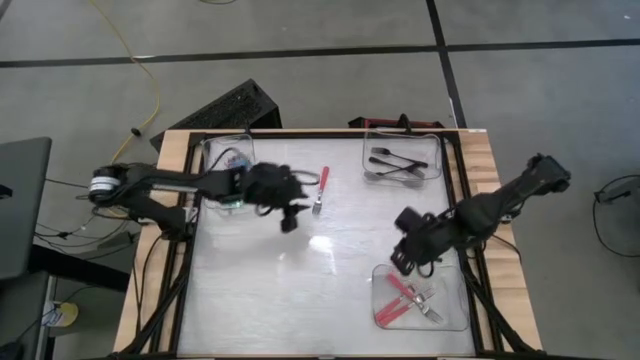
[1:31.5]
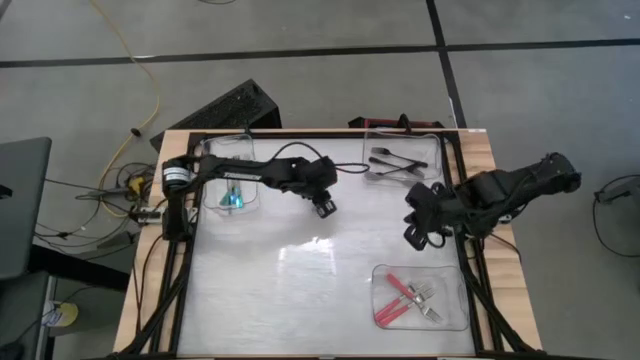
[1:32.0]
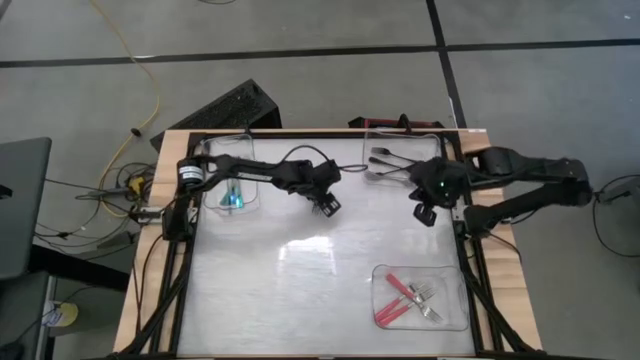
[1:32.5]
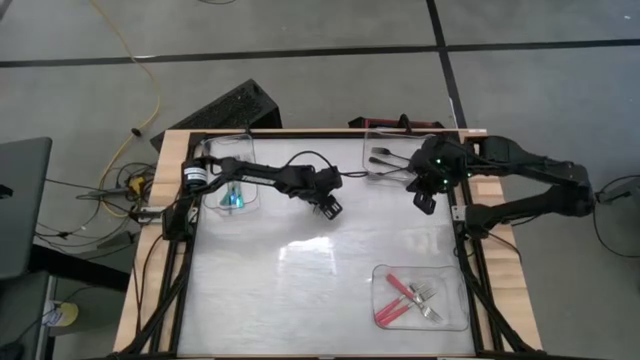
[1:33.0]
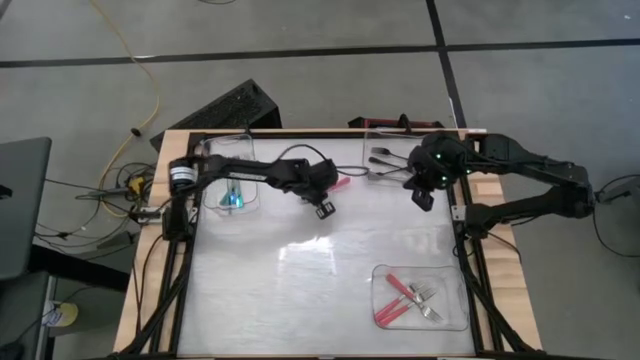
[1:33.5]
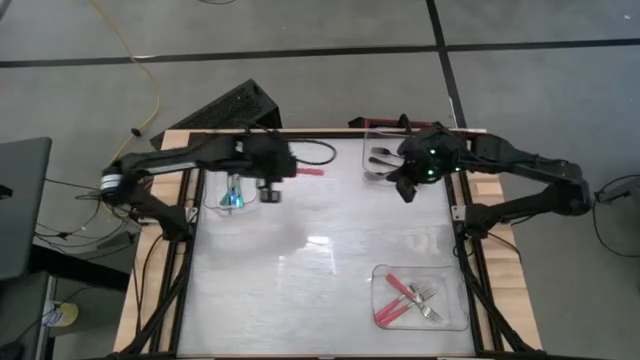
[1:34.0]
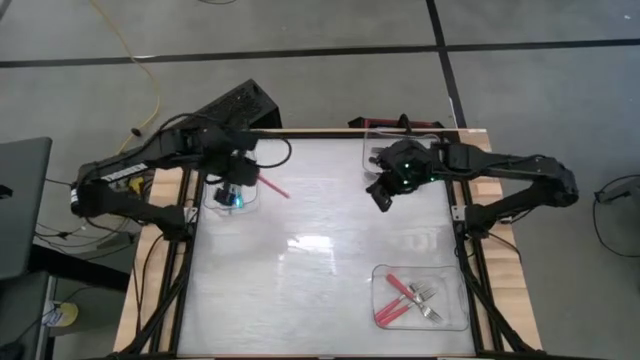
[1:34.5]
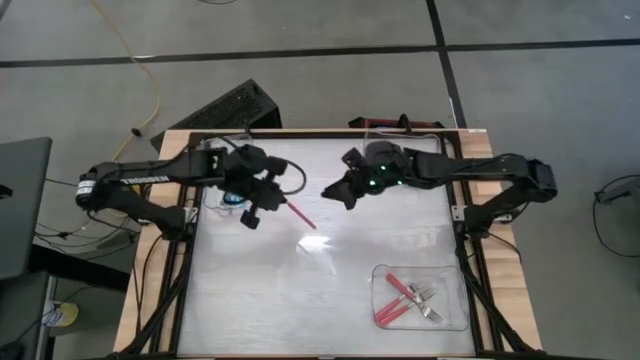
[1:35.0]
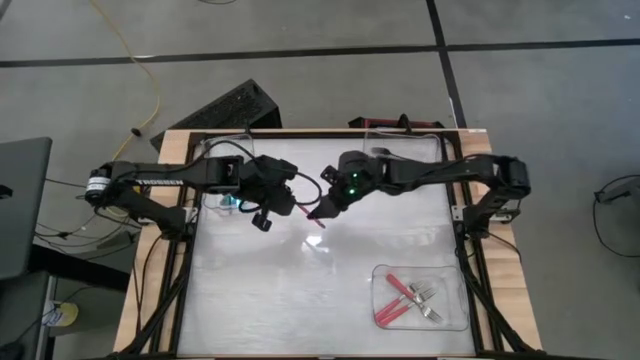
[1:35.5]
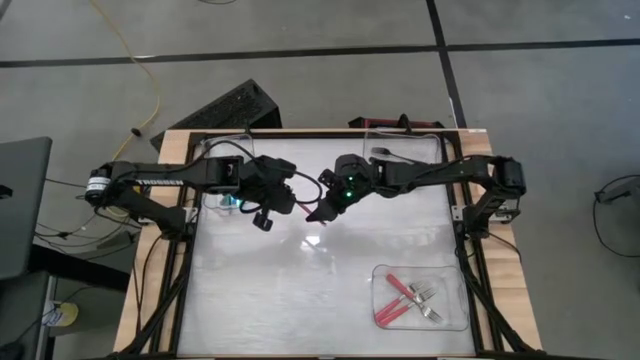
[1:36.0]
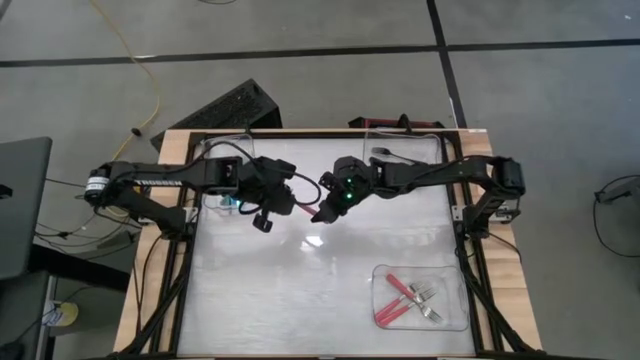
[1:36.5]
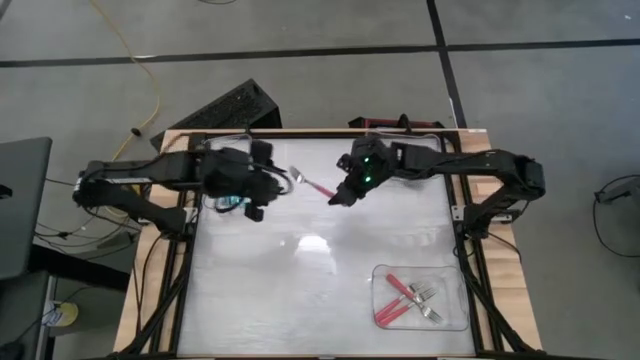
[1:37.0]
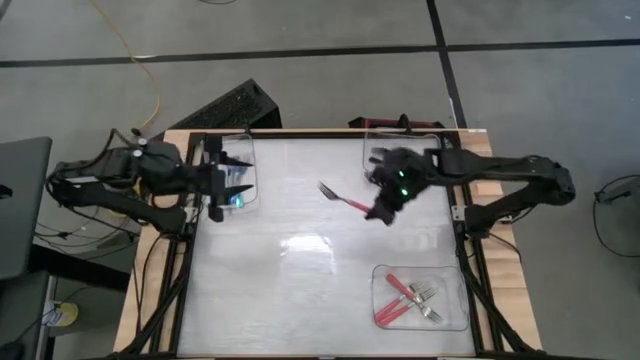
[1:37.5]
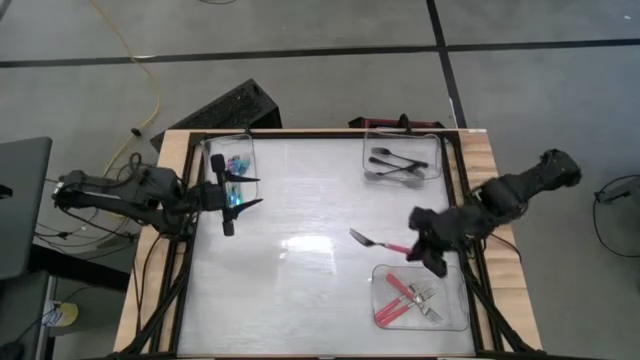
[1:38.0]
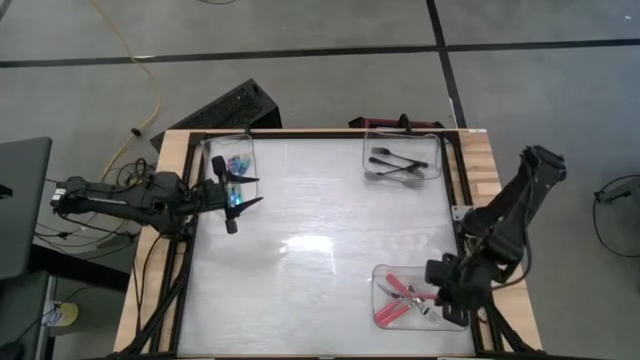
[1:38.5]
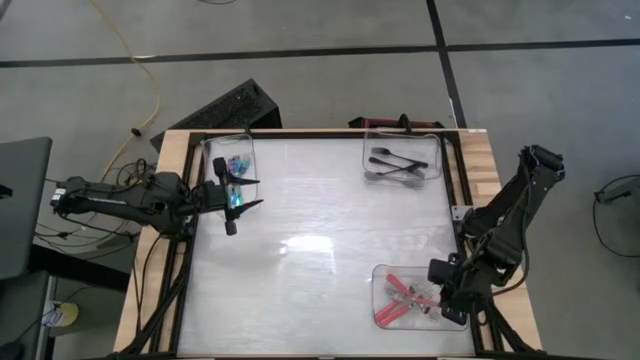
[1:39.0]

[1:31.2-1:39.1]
Task: Sort silverware by color (type)
Put the pink fork into the bottom right transparent bin

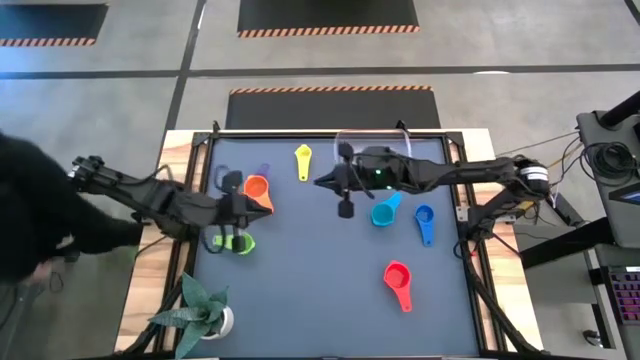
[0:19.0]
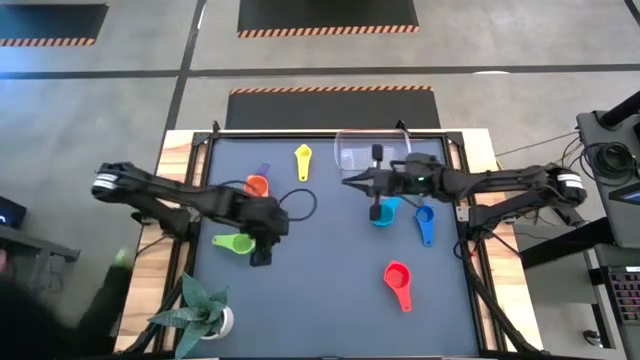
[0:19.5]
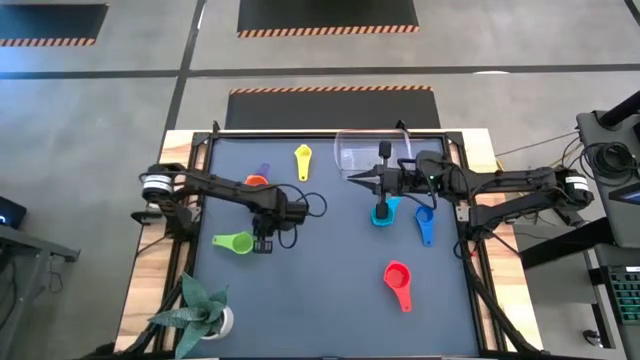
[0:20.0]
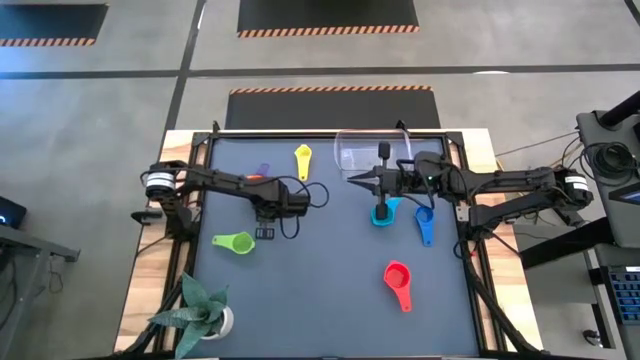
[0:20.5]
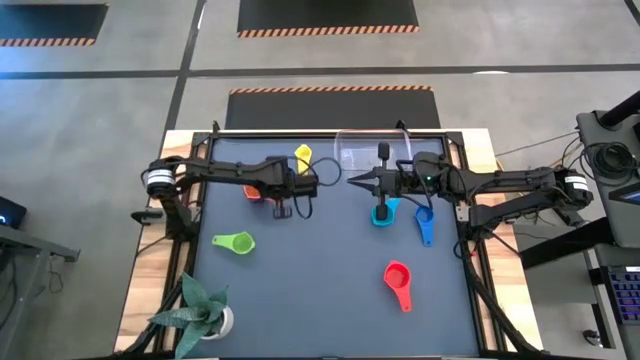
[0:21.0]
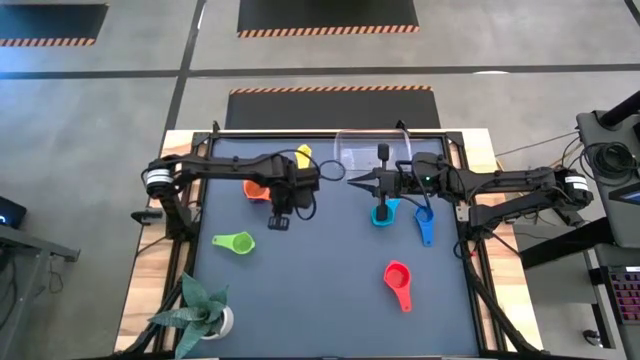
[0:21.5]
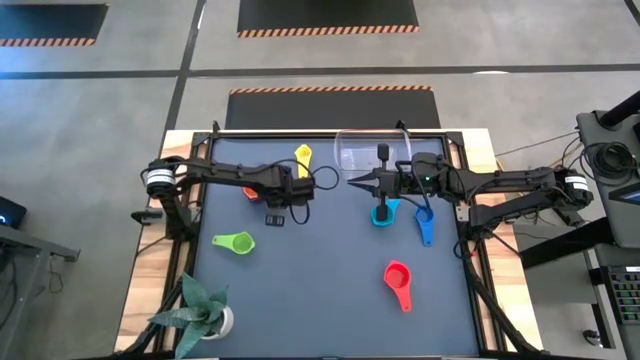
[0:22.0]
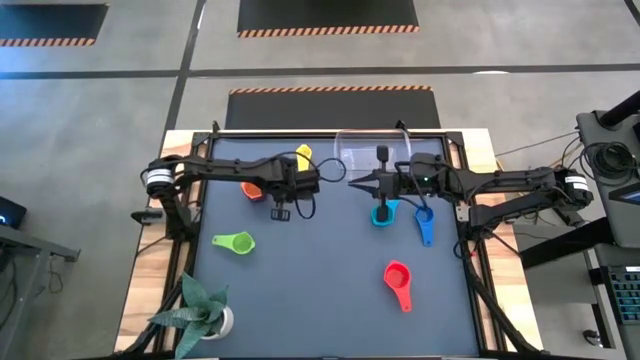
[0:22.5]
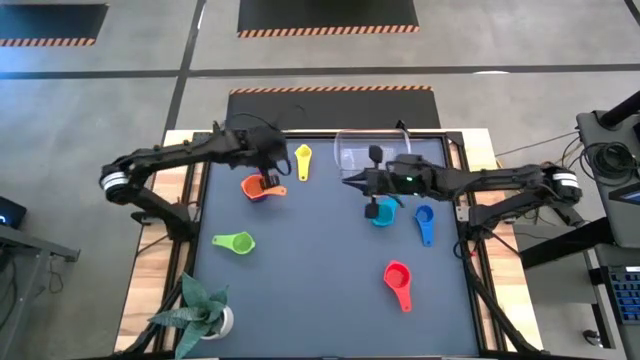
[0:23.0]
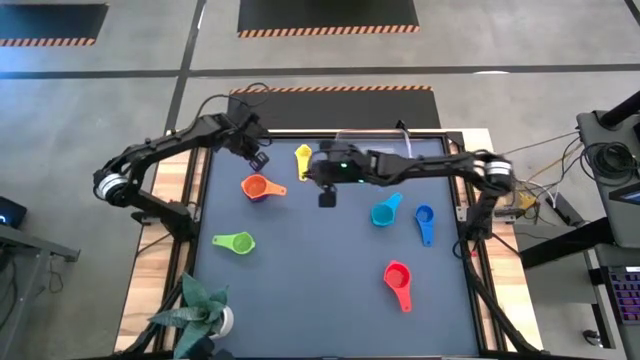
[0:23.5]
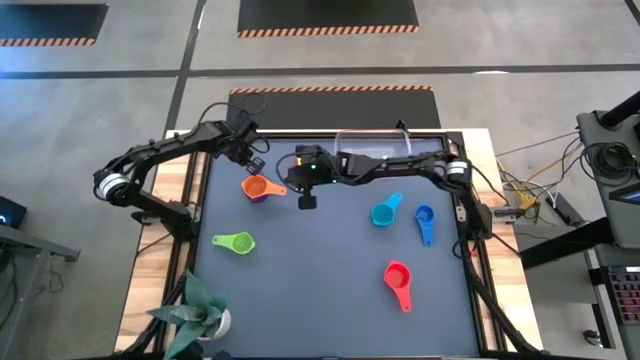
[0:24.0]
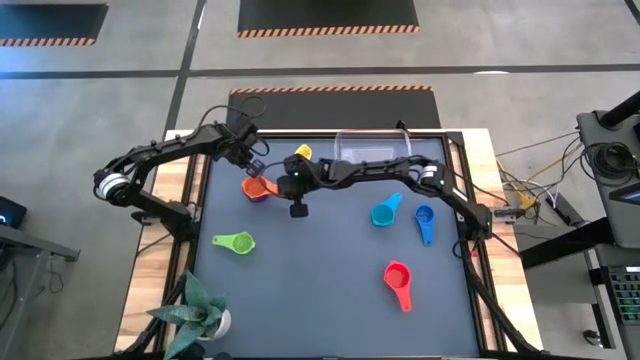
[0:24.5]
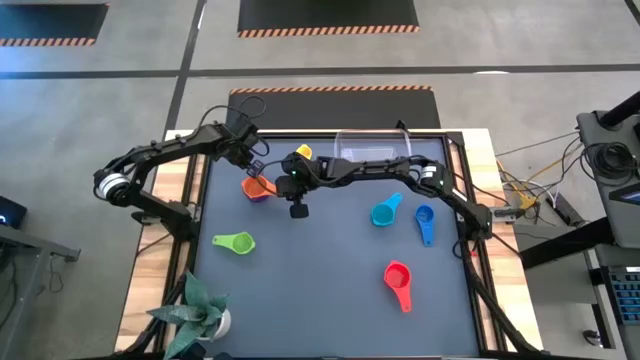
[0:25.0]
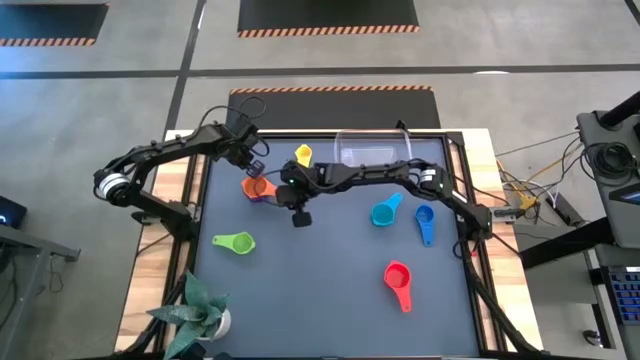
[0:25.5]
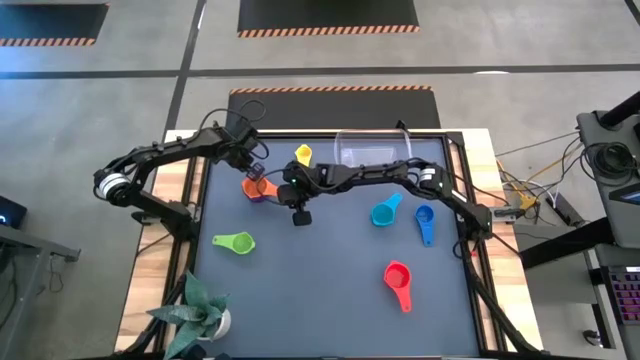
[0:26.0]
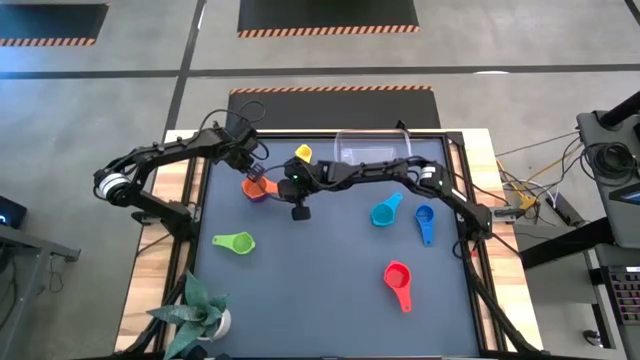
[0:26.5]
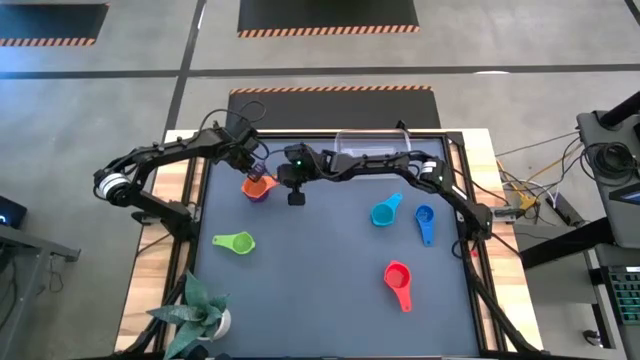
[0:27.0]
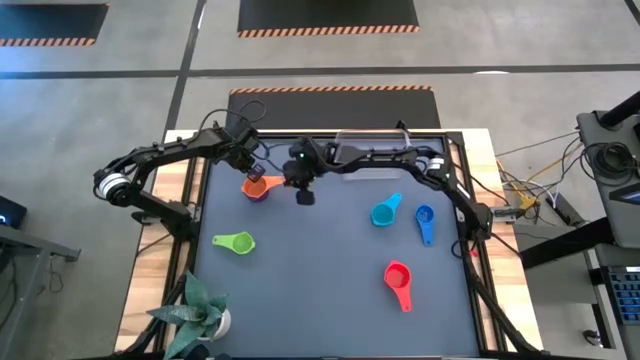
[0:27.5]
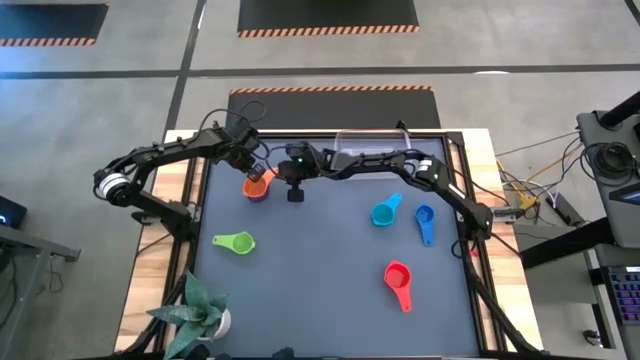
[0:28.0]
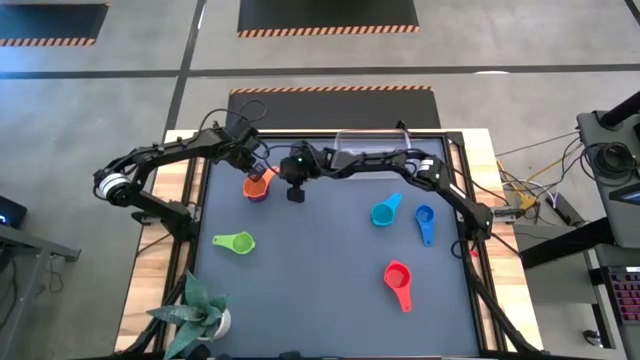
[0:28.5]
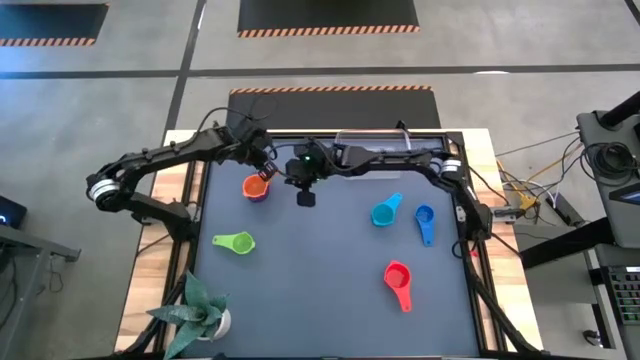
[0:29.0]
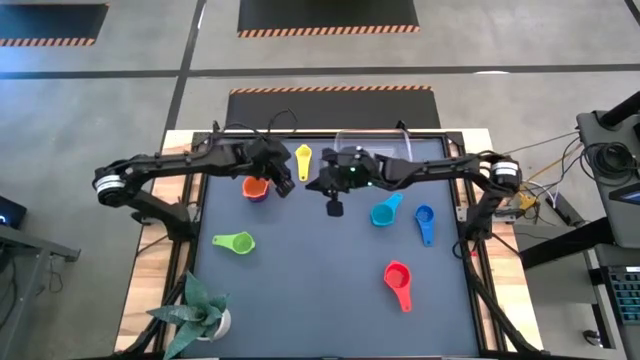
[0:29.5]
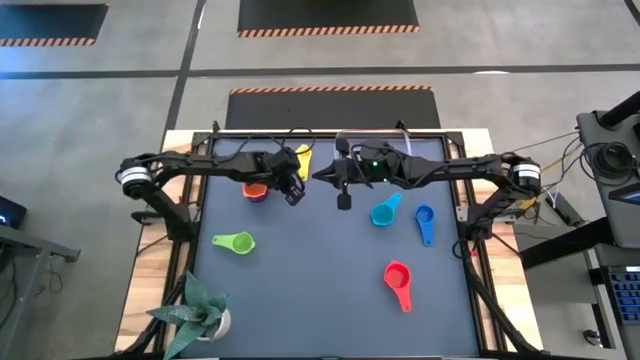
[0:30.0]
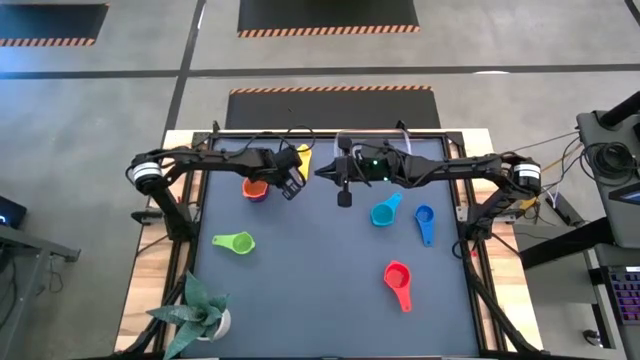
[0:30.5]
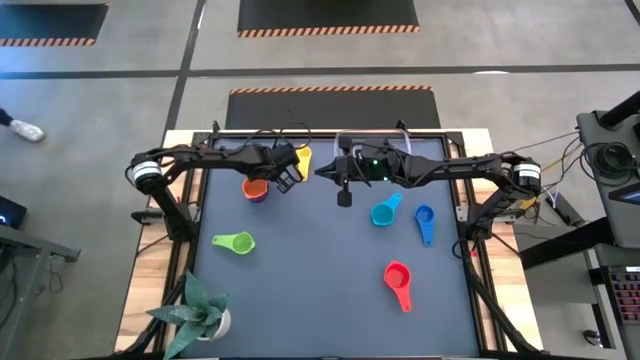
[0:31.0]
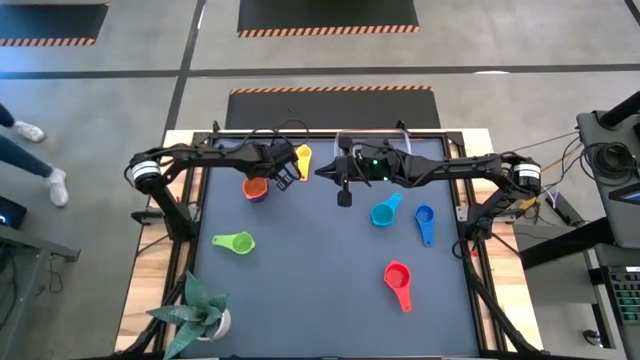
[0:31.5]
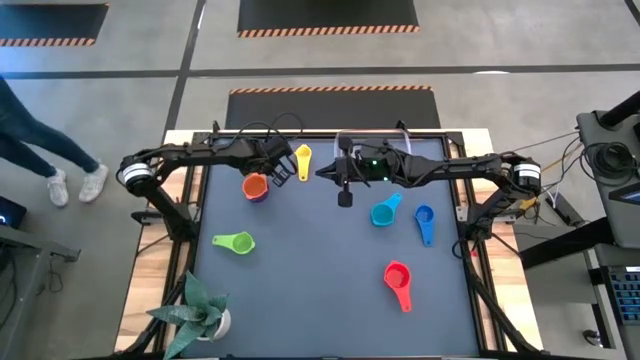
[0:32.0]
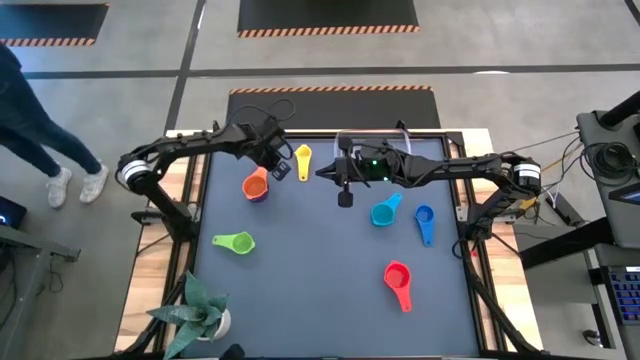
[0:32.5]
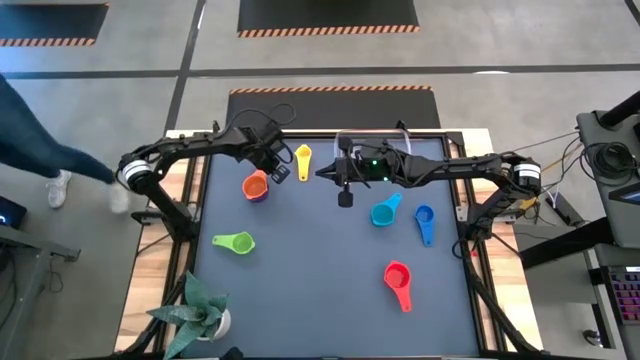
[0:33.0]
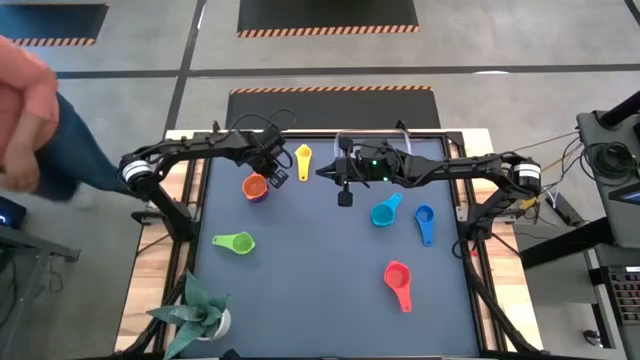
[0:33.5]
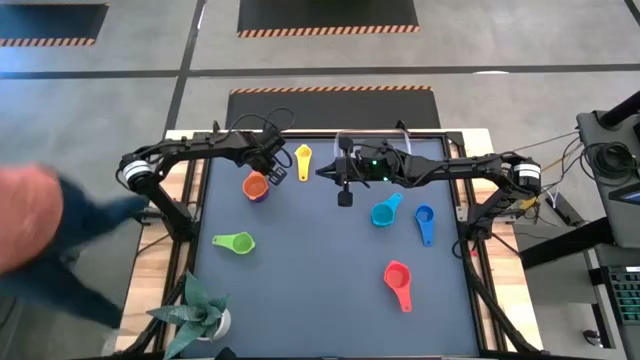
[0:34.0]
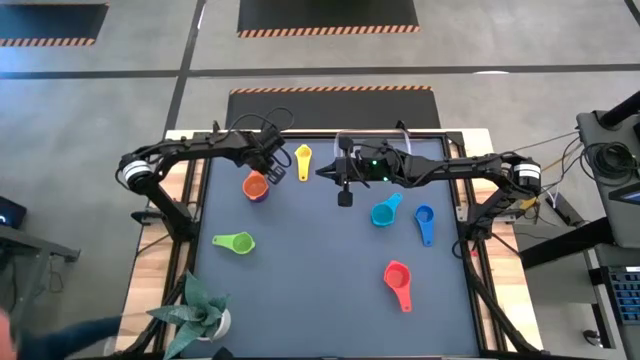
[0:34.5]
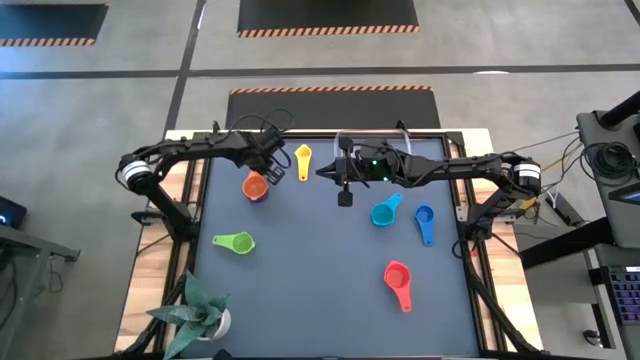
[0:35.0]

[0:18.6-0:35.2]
Task: Nest measuring cups in basket
Stack the orange measuring cup on top of the violet measuring cup
